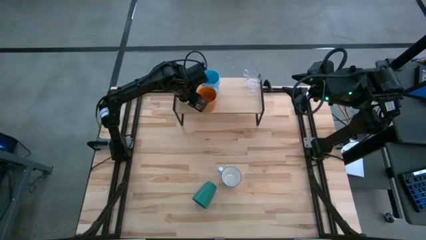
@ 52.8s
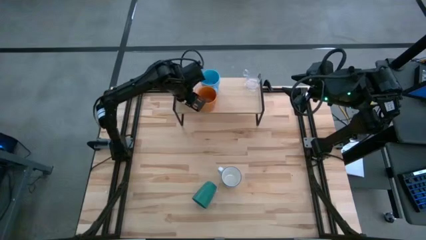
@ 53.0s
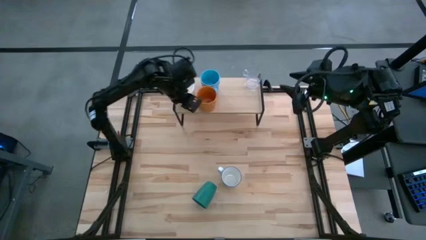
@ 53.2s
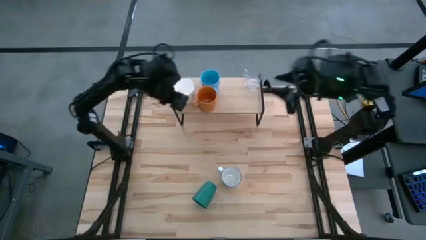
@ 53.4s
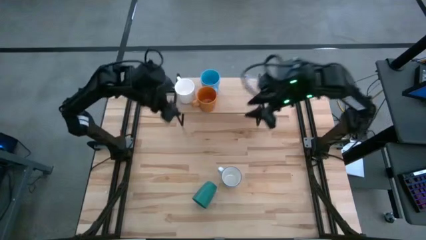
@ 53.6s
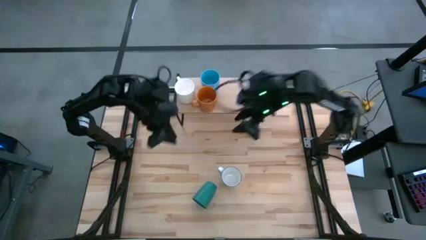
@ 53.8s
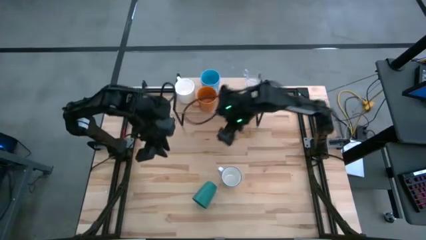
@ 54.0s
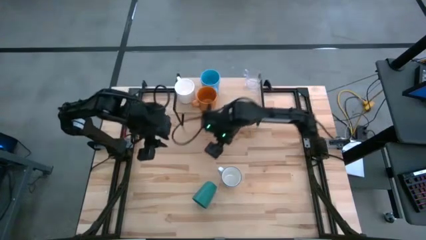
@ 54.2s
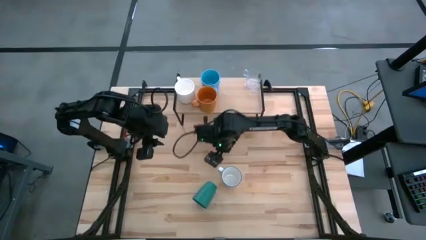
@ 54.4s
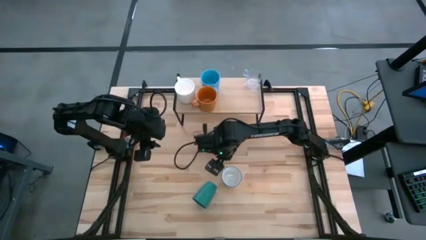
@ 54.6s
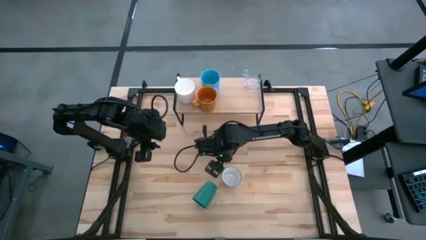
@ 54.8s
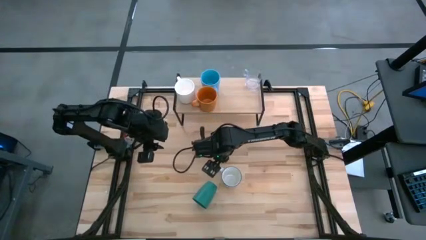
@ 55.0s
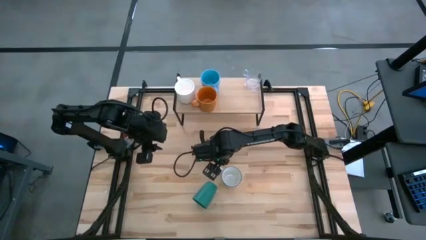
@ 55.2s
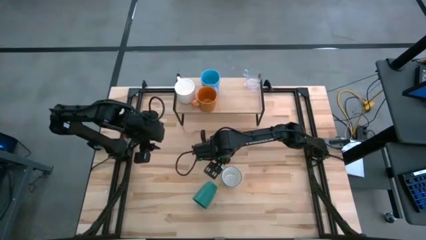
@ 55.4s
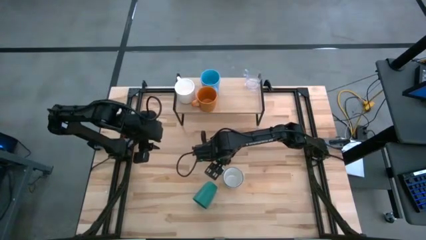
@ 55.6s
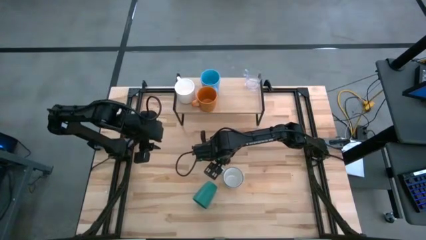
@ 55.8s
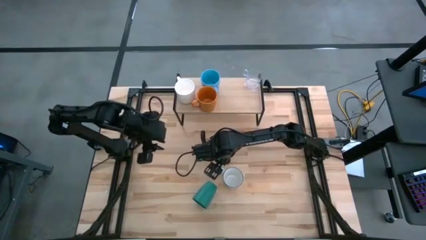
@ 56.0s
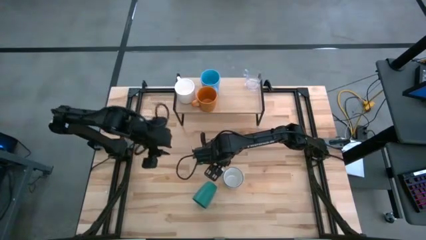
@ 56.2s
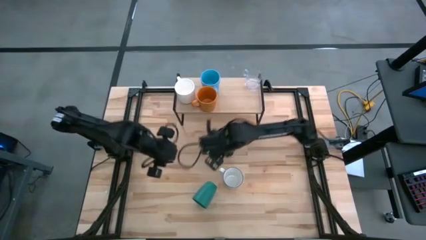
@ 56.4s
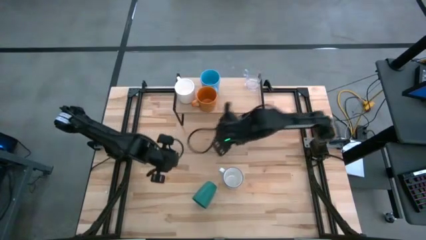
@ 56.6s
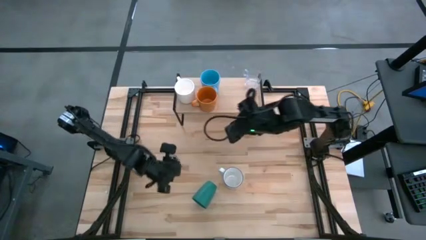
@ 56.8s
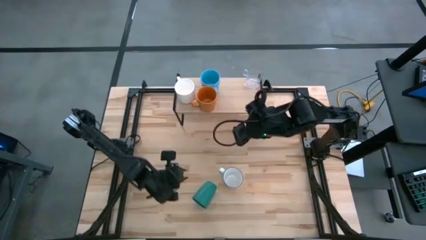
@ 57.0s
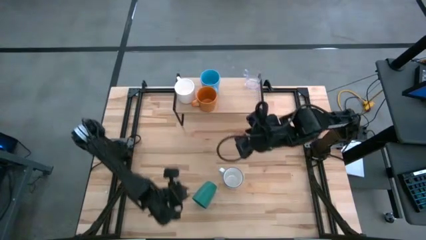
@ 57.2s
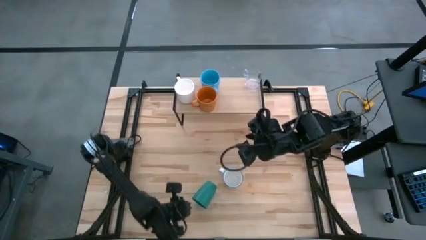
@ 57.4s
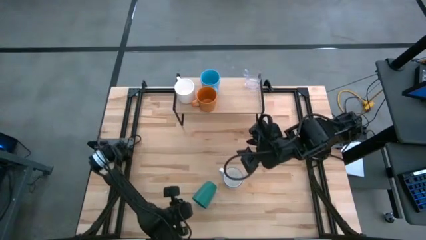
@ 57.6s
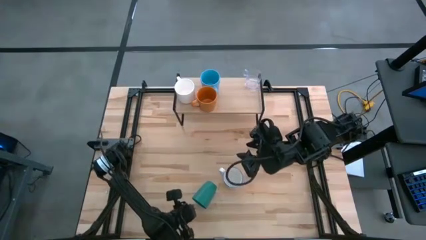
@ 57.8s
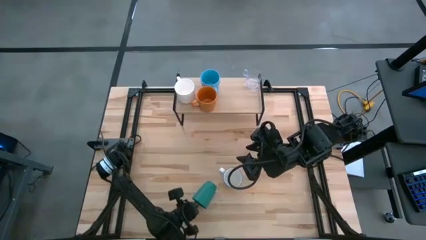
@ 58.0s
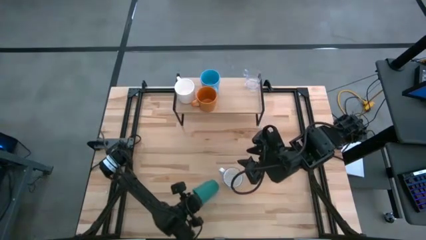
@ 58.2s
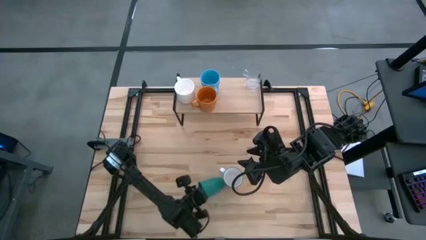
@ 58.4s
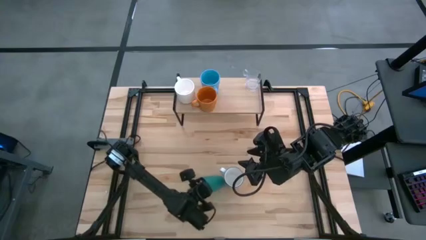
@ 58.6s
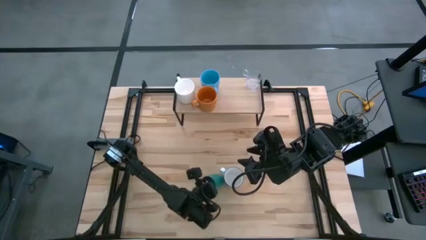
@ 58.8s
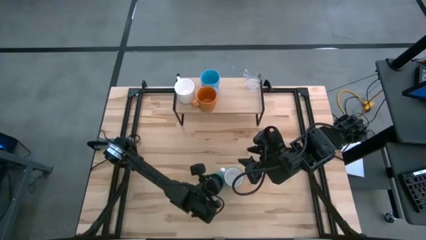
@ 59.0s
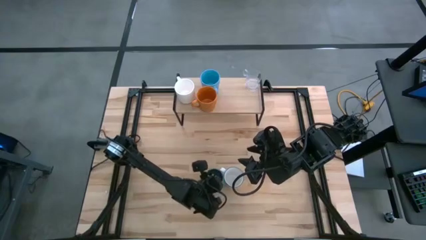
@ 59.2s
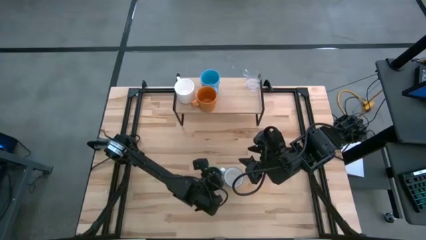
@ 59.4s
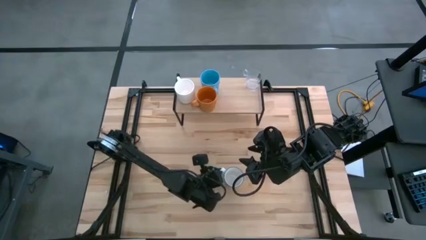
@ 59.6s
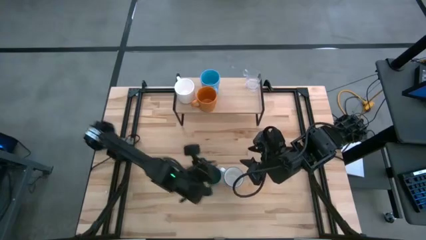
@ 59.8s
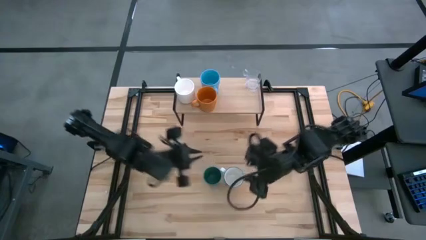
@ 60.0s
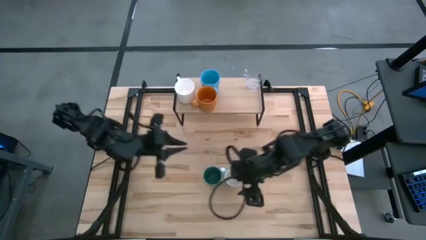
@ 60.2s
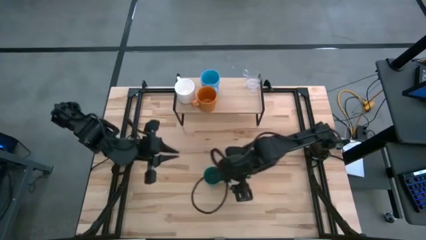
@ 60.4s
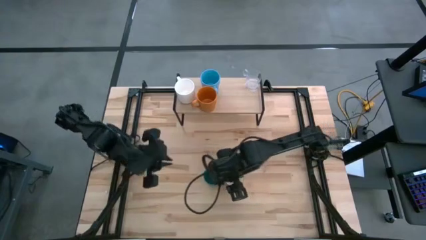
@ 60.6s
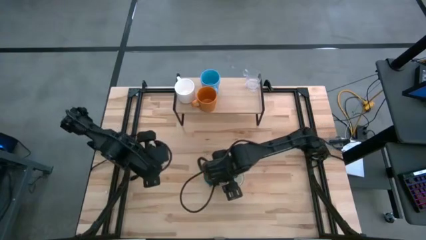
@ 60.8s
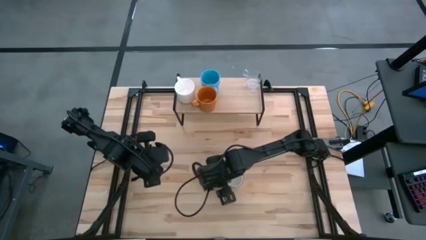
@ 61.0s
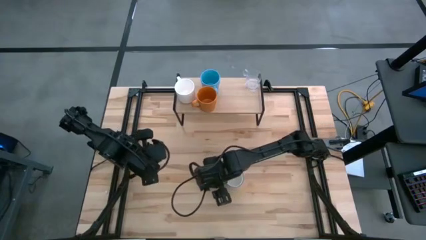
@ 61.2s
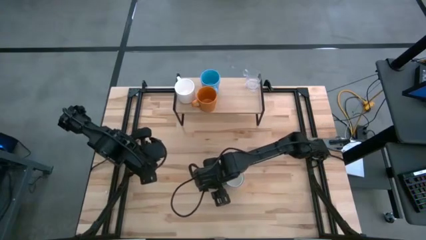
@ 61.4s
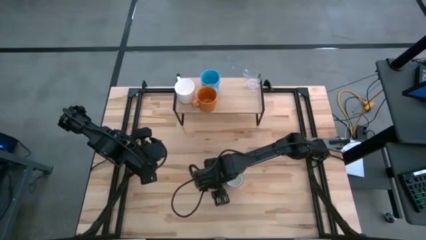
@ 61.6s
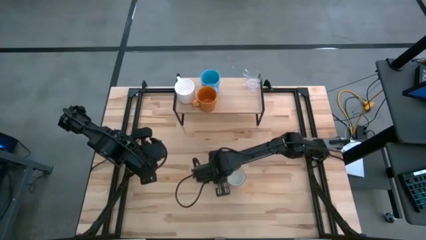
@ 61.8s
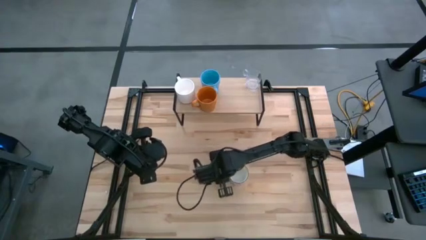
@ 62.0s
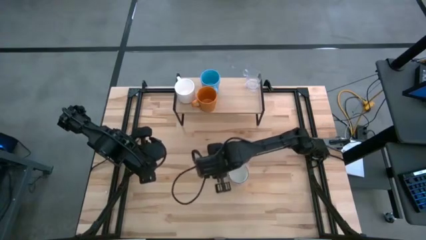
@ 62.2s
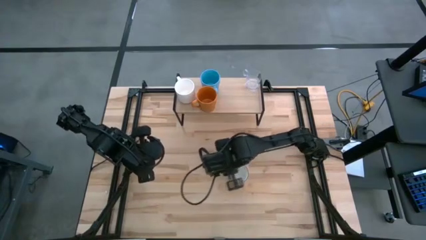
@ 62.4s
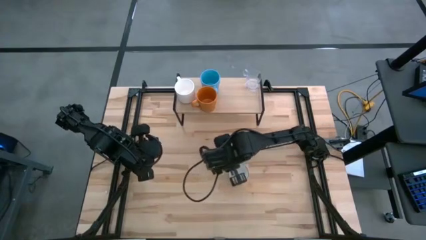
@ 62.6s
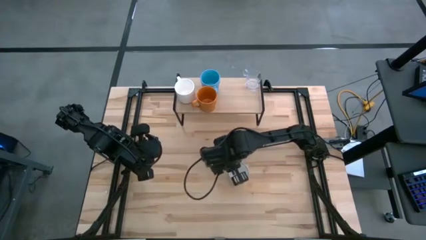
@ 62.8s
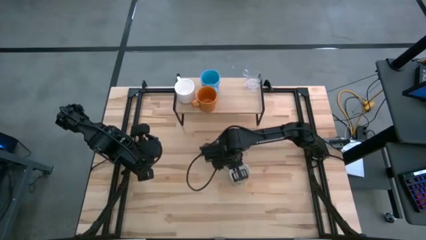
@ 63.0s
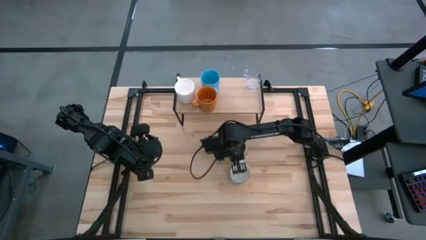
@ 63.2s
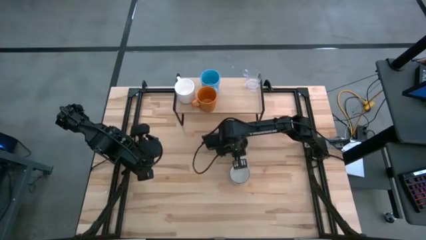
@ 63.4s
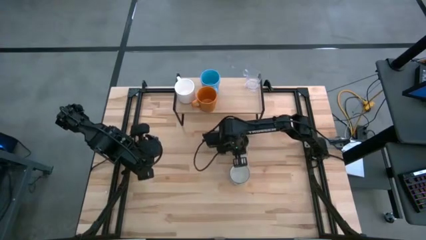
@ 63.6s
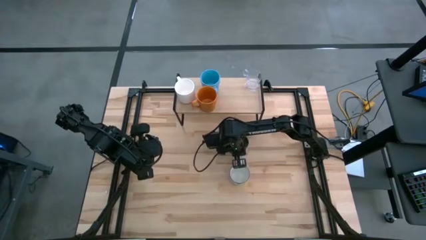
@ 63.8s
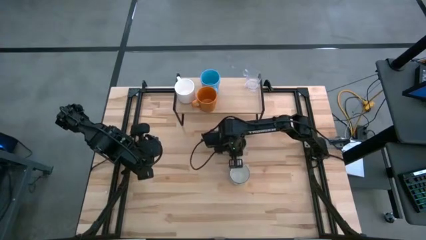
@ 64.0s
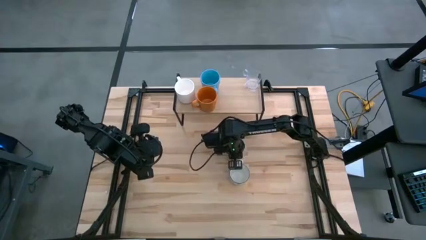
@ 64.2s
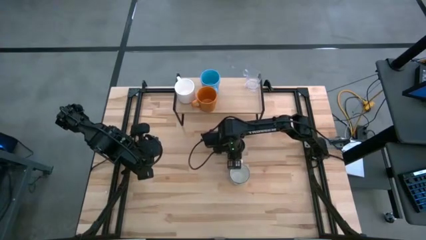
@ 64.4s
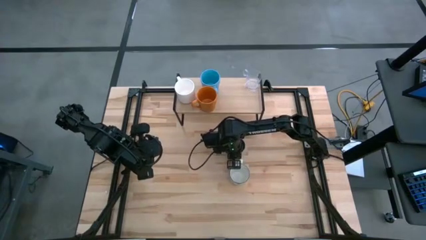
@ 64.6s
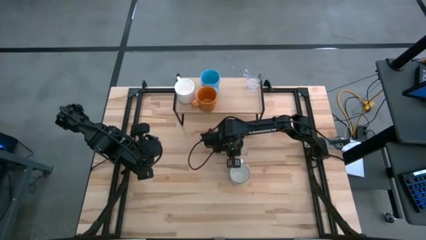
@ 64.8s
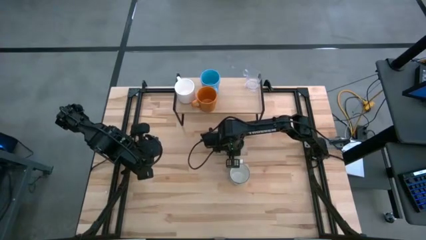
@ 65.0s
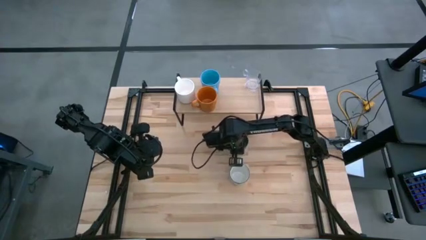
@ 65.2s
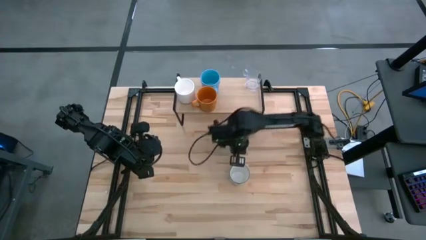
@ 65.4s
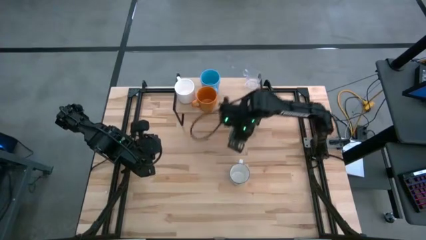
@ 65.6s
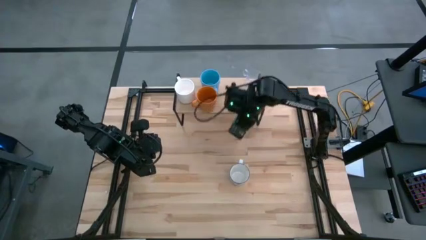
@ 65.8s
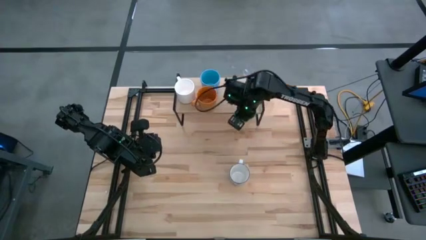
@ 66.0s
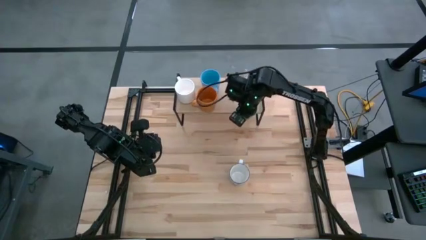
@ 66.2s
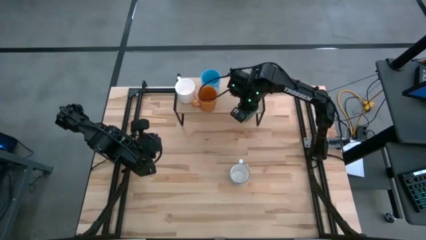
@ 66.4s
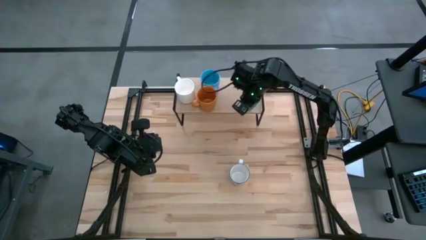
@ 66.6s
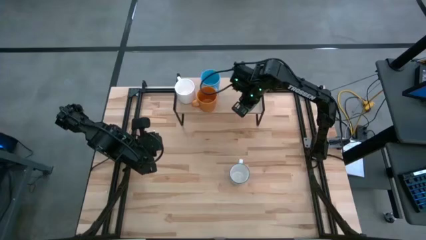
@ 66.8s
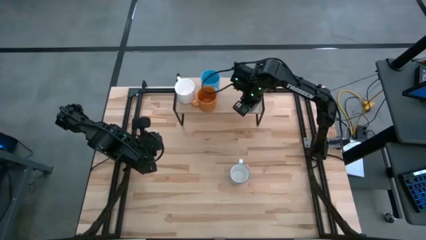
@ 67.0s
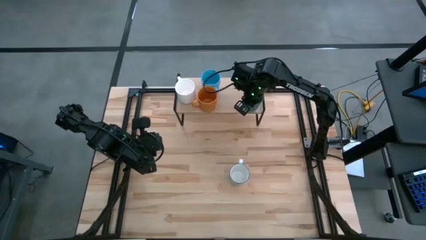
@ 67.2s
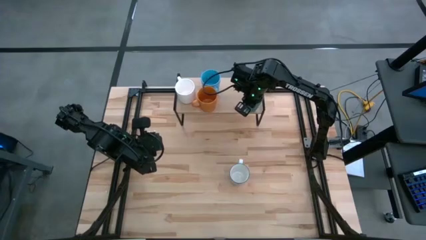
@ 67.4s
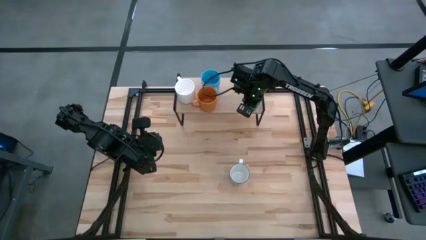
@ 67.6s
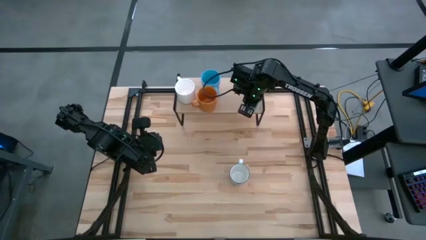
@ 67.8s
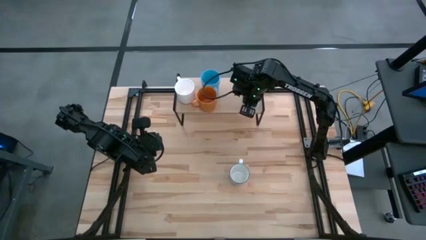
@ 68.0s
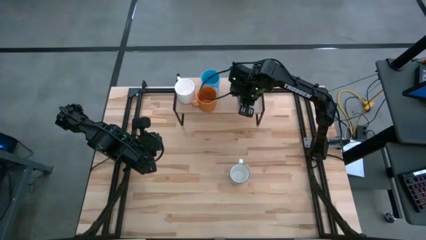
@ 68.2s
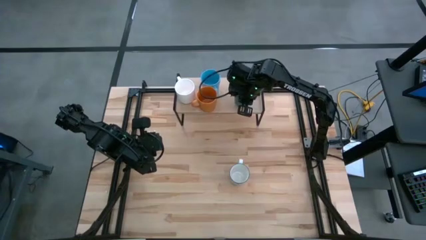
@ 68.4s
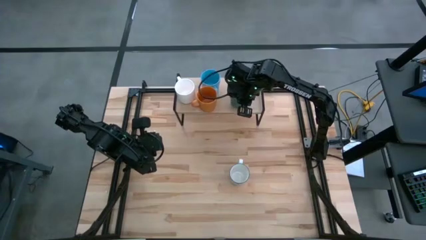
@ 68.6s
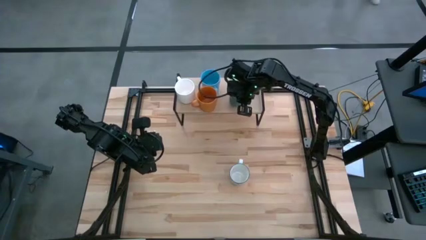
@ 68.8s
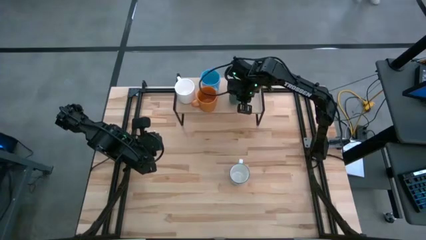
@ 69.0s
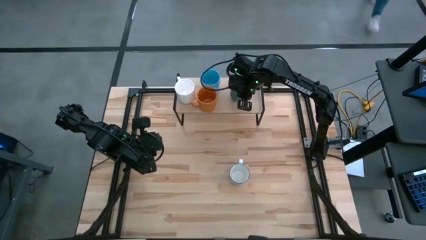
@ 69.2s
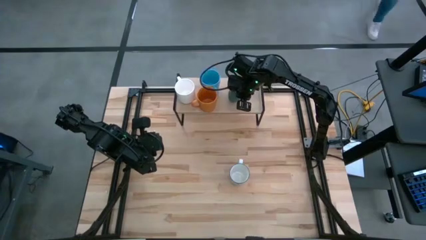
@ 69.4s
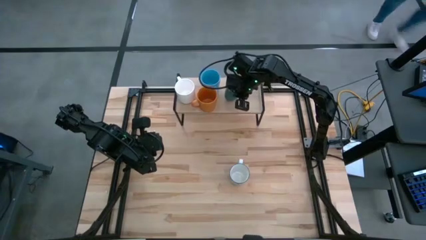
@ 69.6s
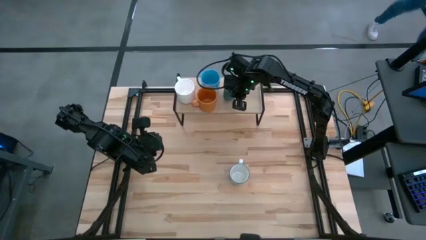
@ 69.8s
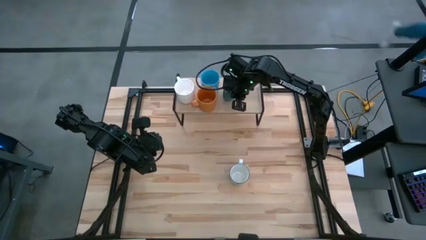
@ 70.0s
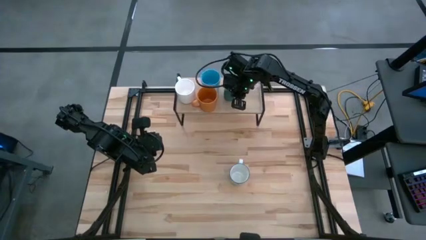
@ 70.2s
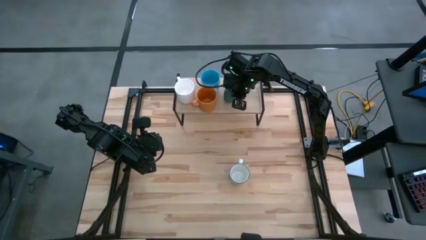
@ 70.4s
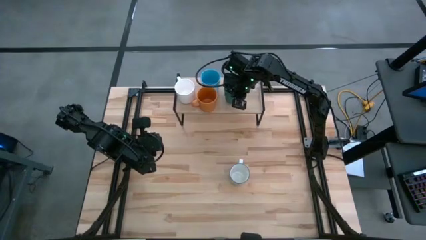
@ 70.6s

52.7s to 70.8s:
Task: Stack small to large cups/mugs on shelf
Put the dark green cup on the shelf
